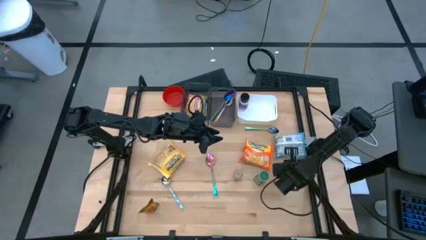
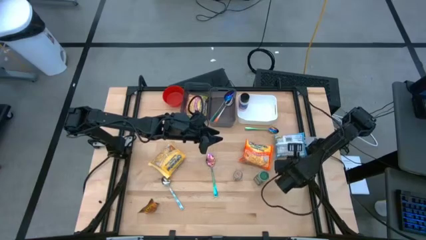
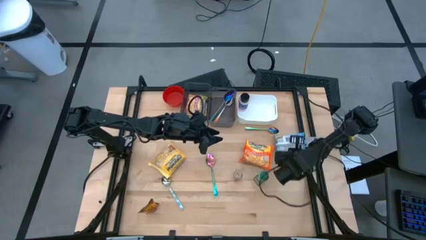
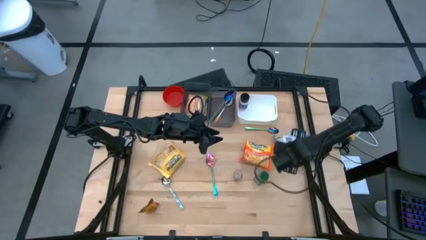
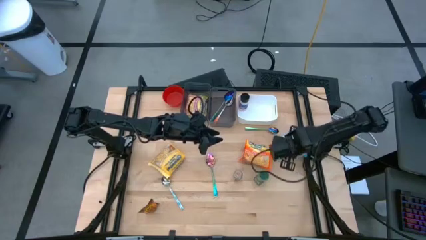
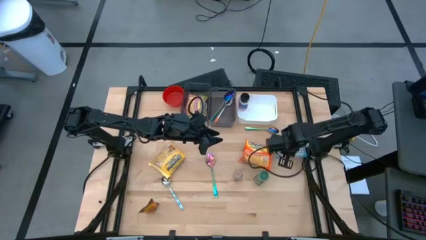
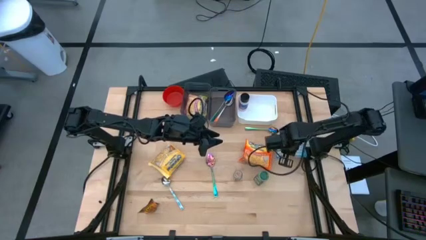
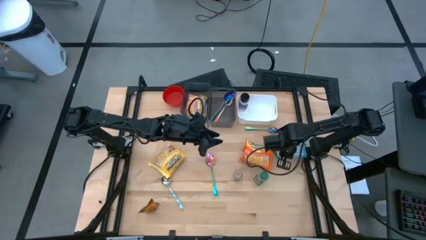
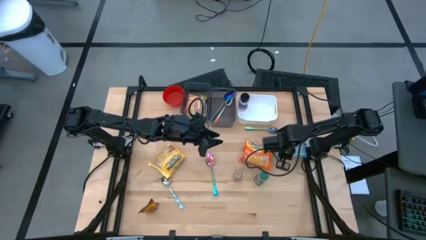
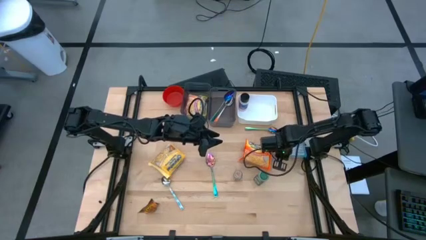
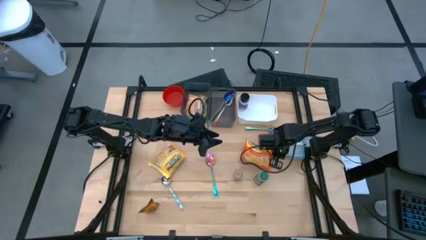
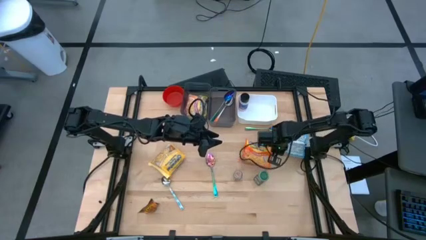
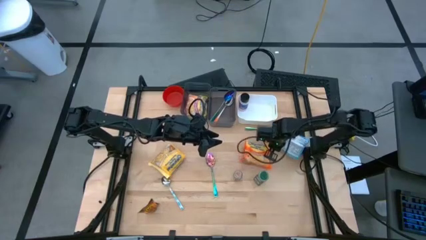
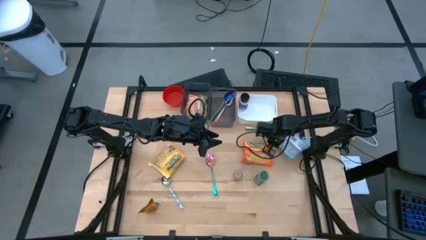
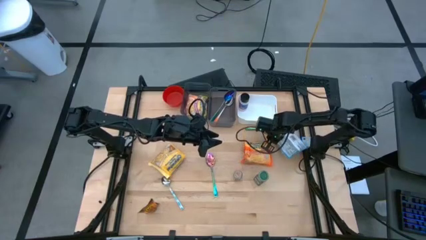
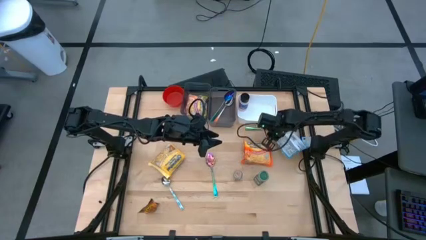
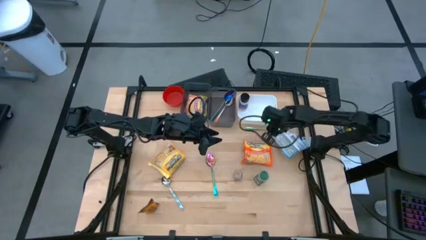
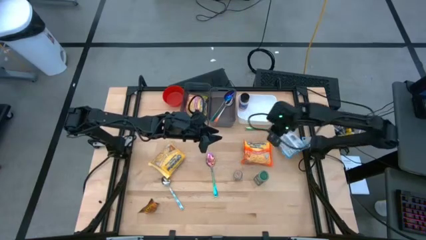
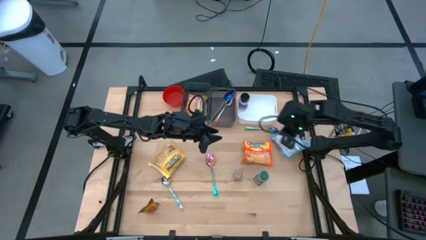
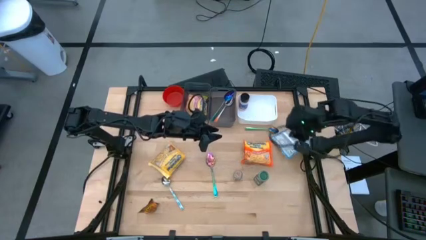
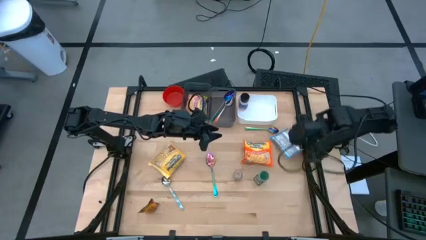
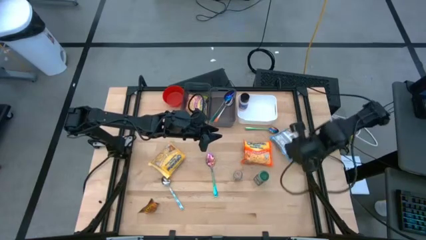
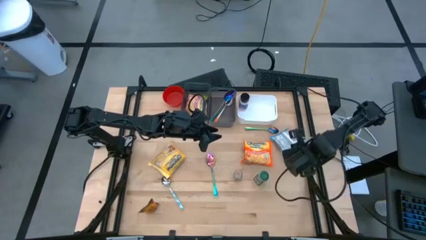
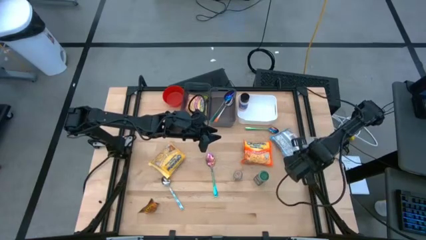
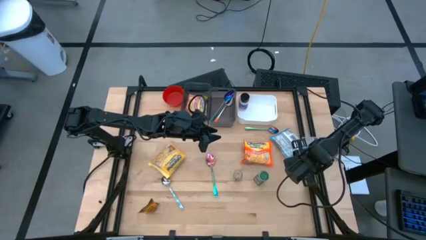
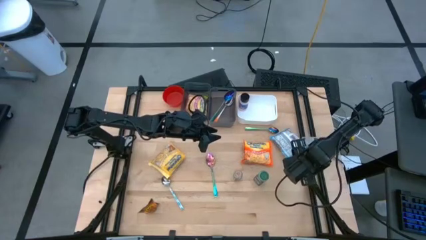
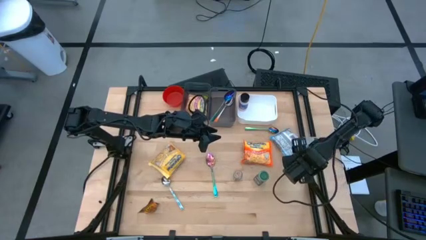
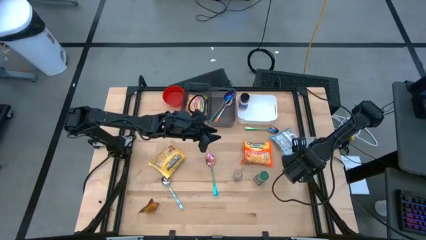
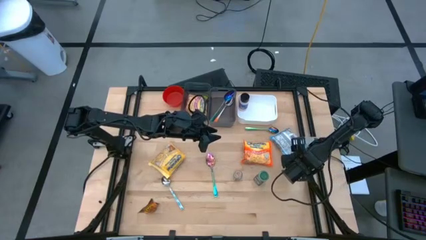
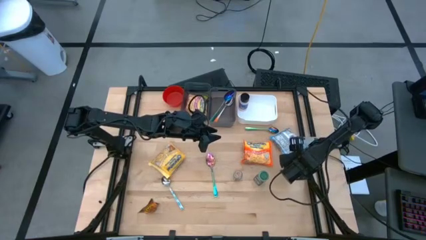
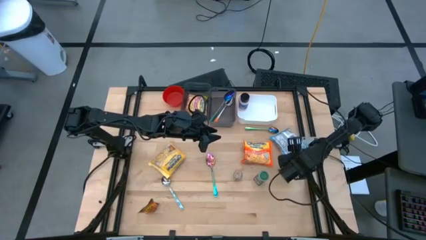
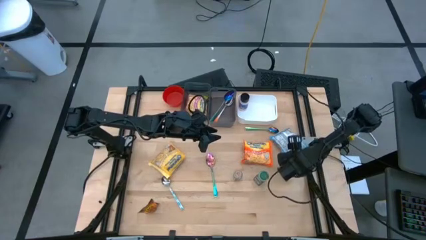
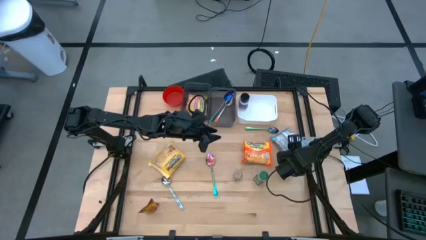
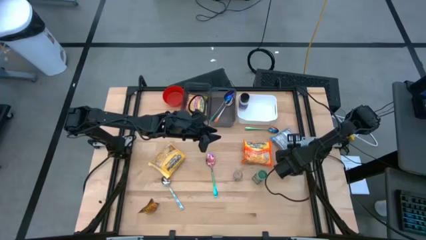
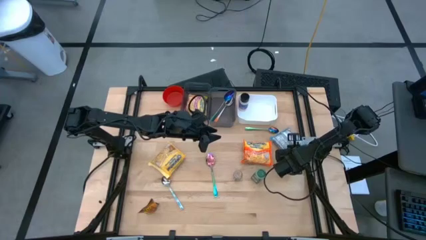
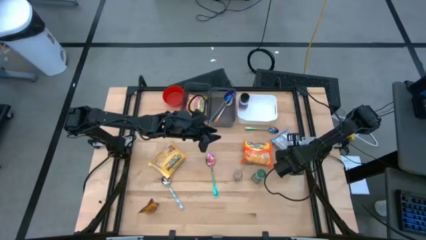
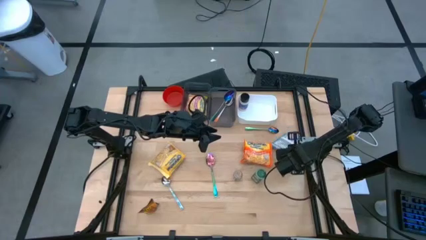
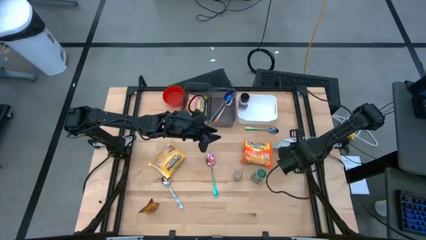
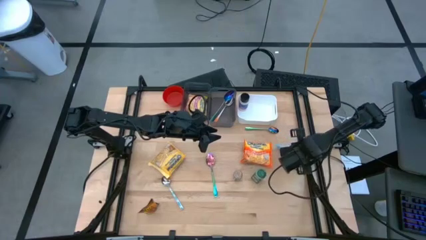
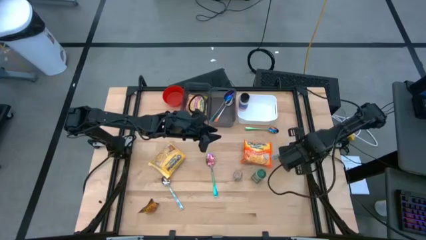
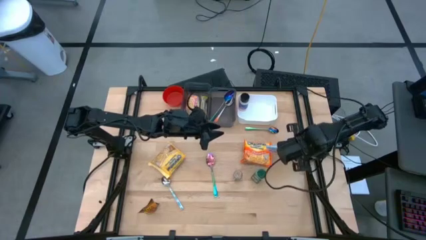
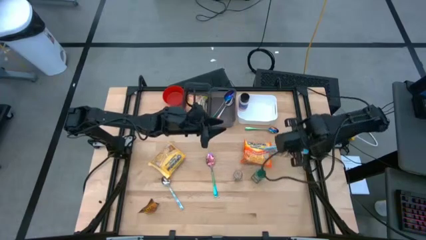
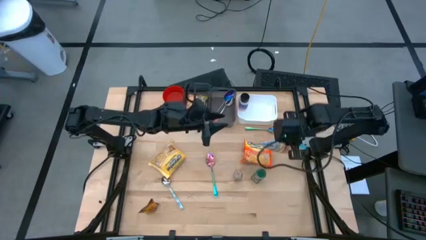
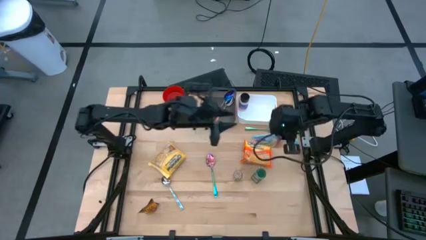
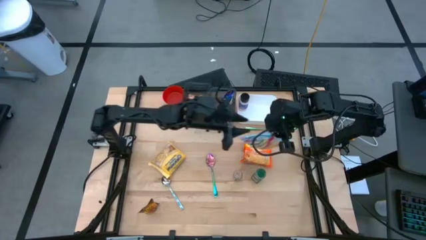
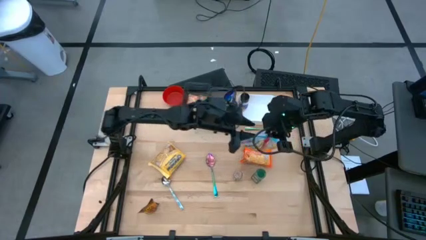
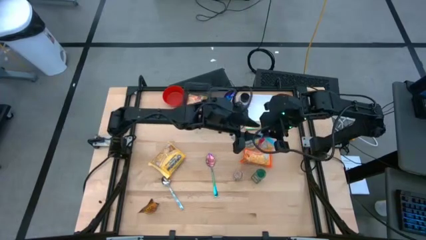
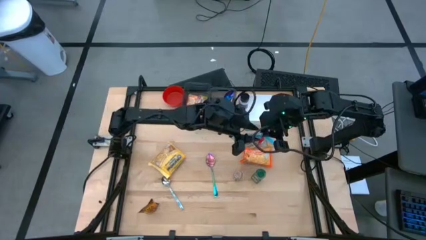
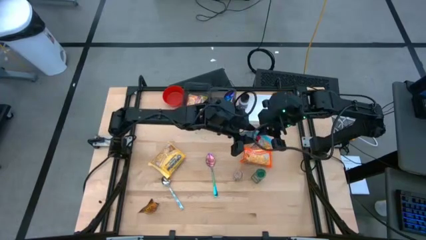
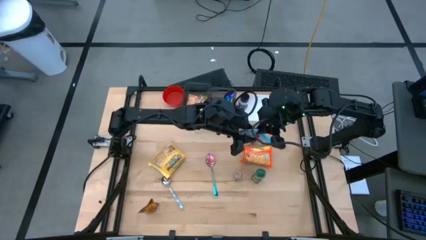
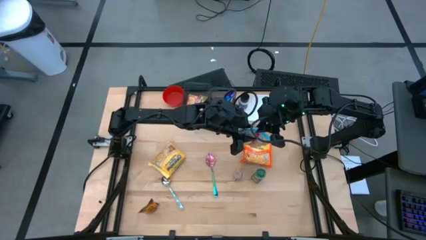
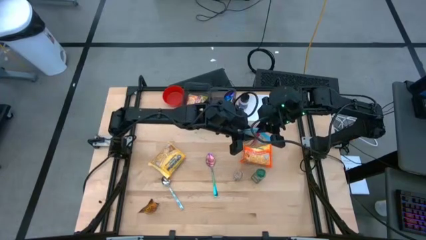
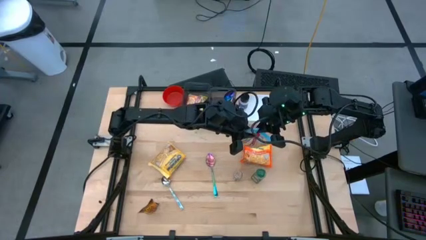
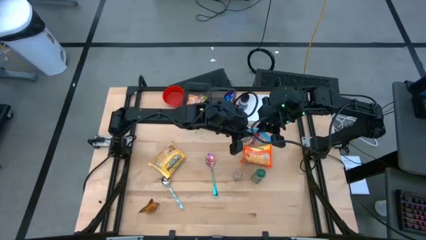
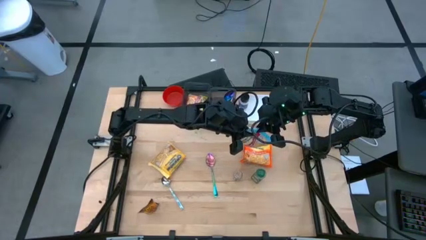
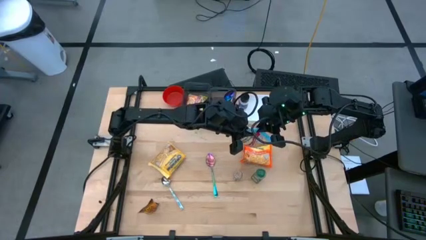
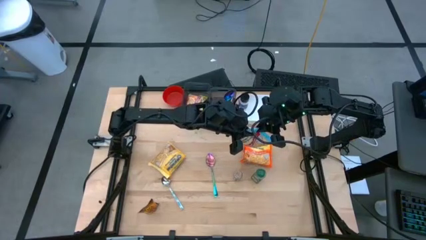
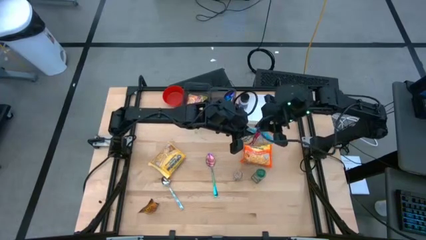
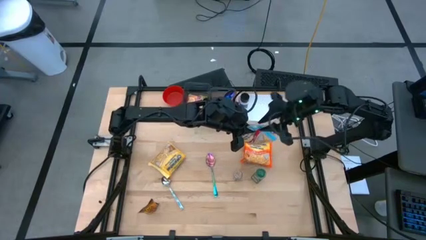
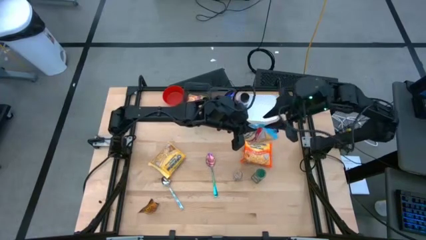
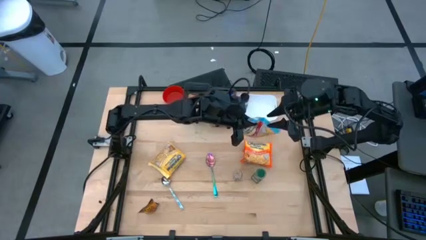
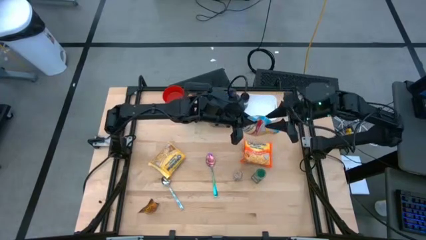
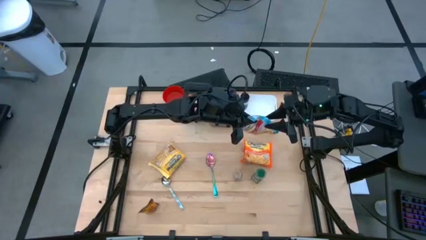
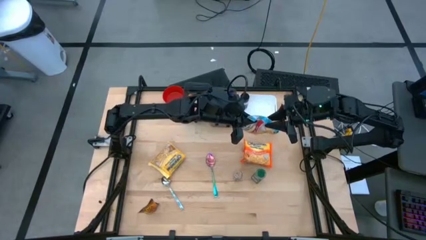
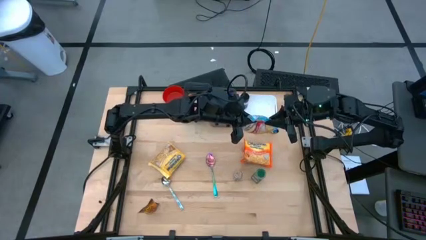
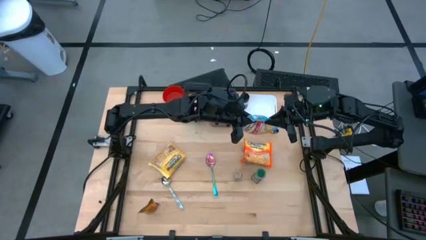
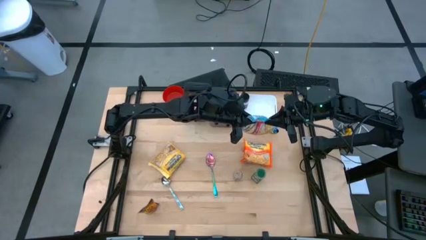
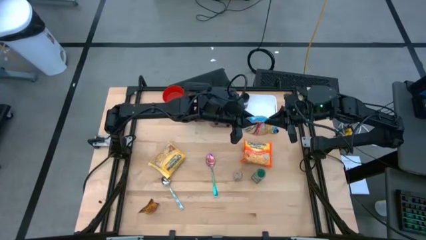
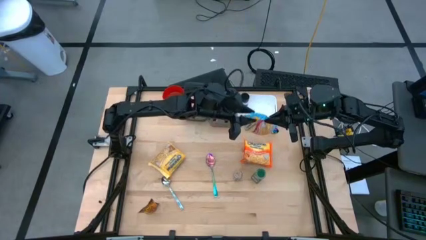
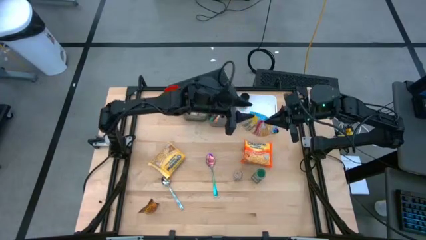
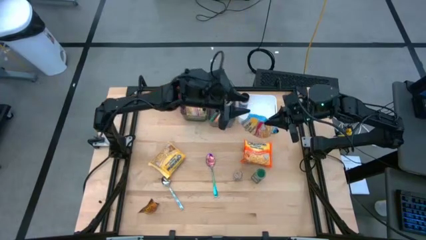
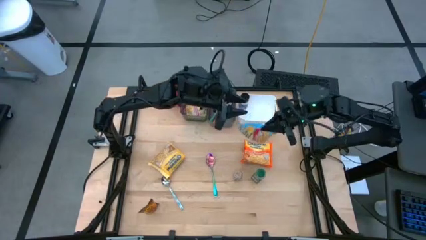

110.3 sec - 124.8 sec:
Task: Pick & Place Food Item
Put the blue noodle pack into the left black bin

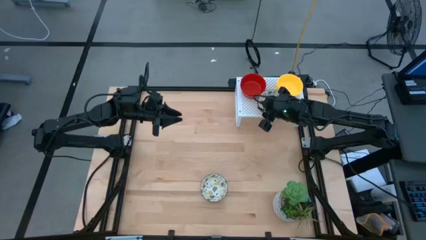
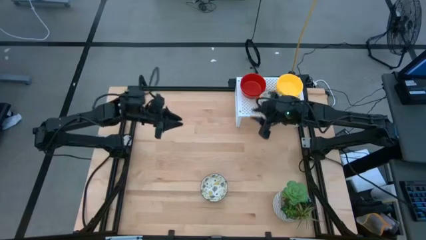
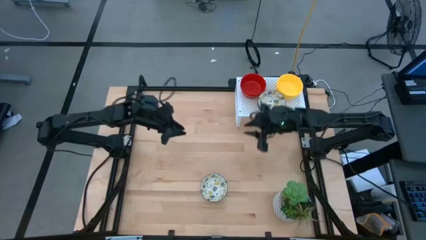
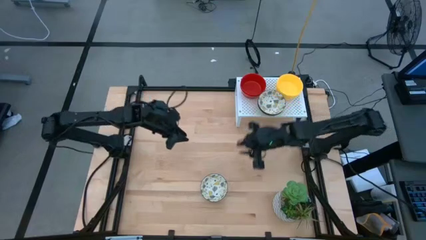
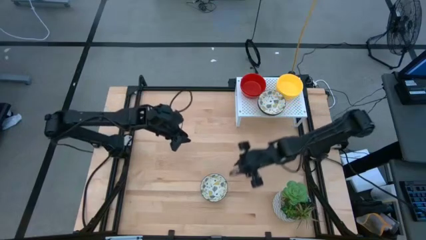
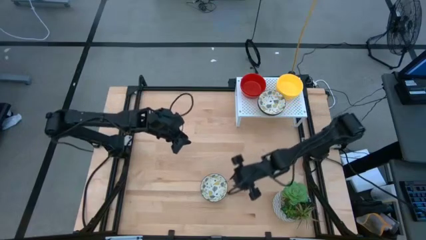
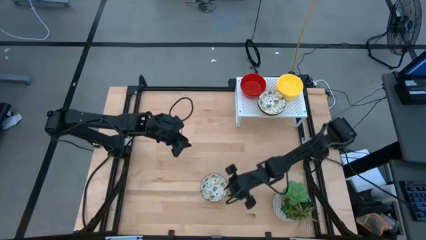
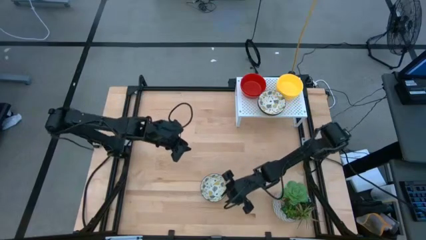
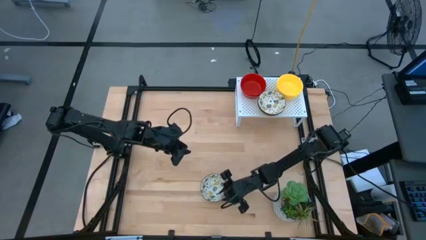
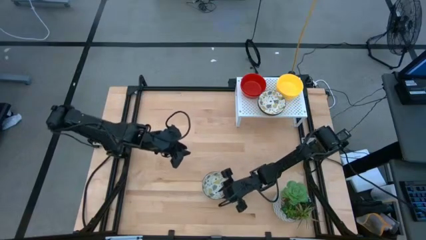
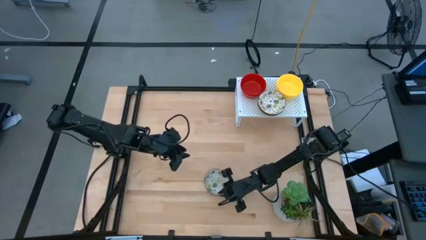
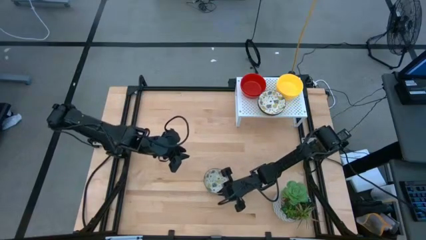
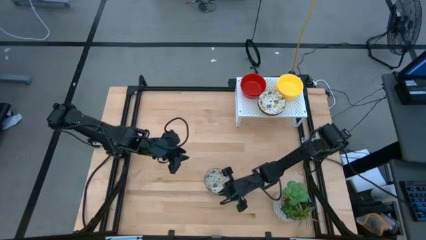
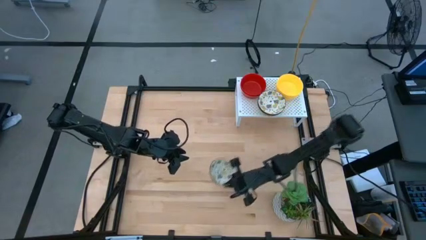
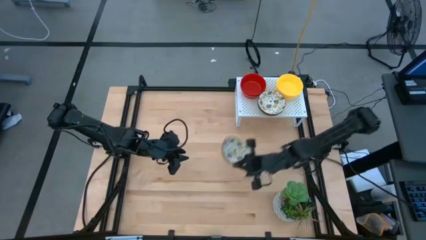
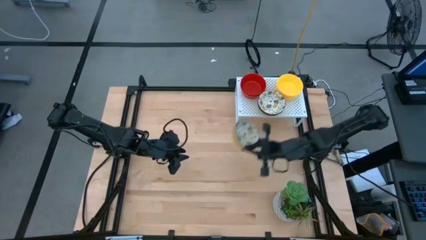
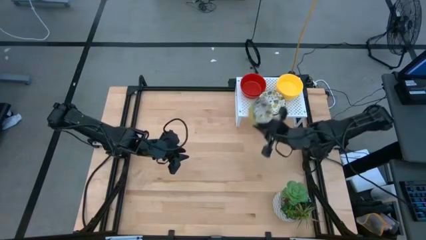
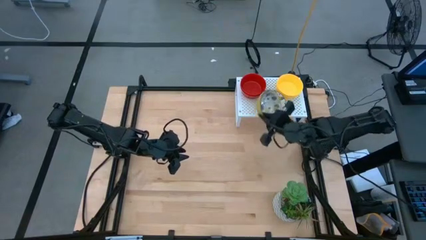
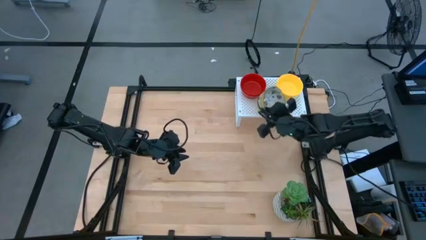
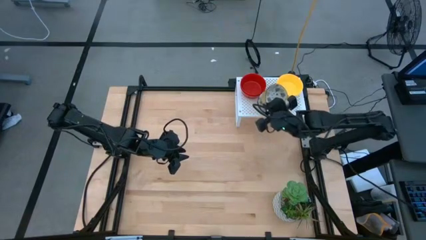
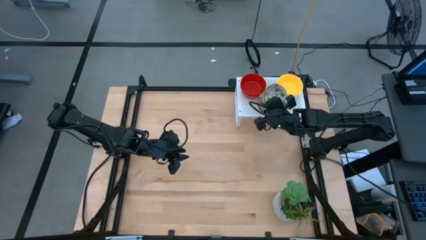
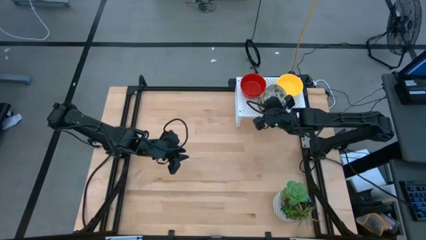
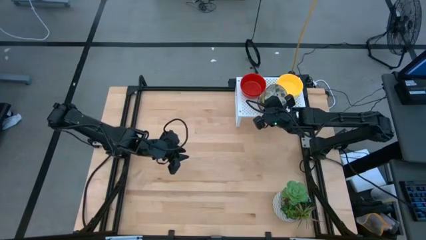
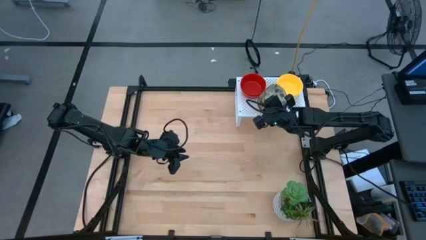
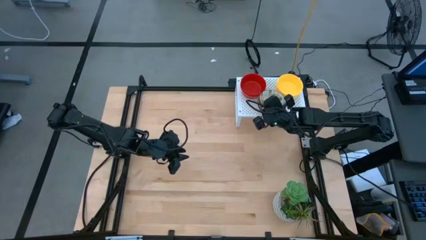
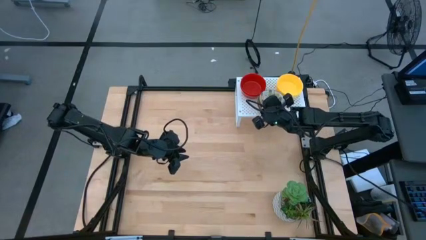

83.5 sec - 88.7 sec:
Task: Pick & Place Mini bowls
Stack the white patterned bowl on top of the white patterned bowl on the shelf
